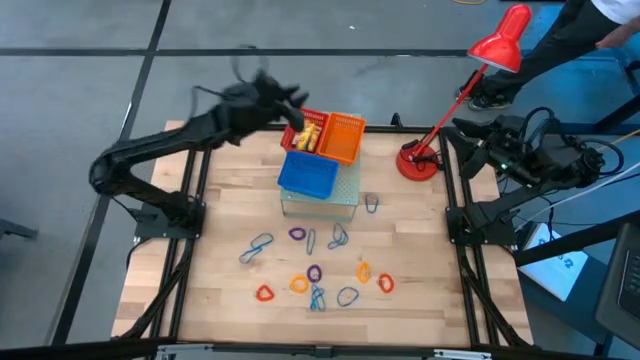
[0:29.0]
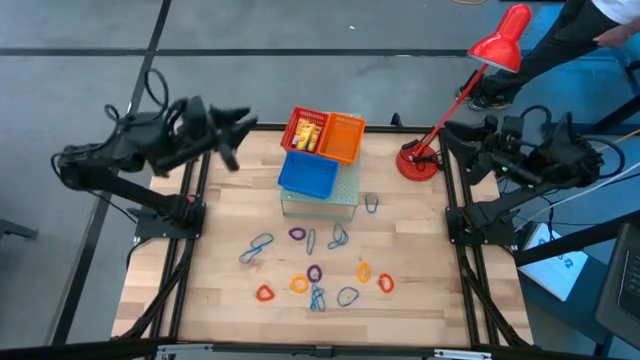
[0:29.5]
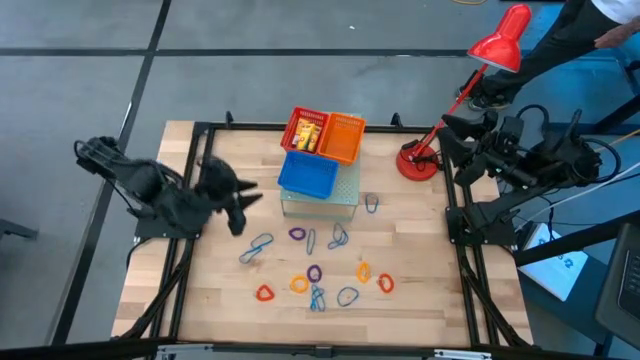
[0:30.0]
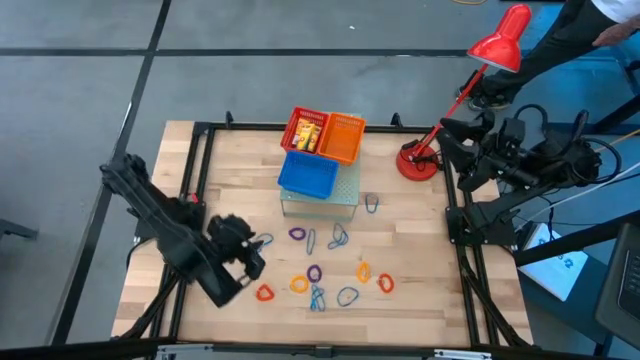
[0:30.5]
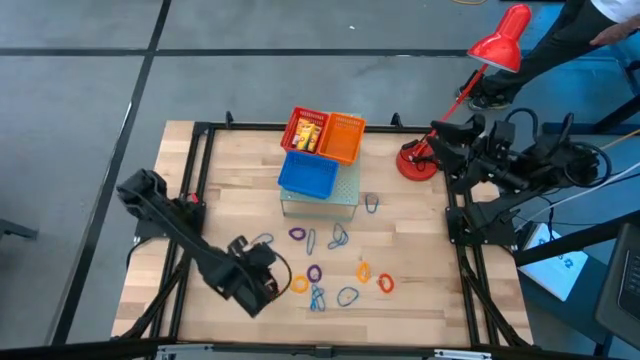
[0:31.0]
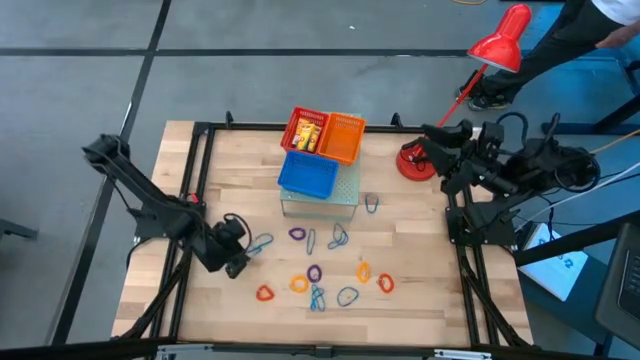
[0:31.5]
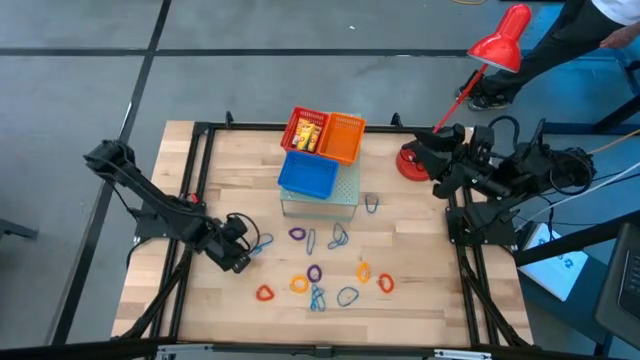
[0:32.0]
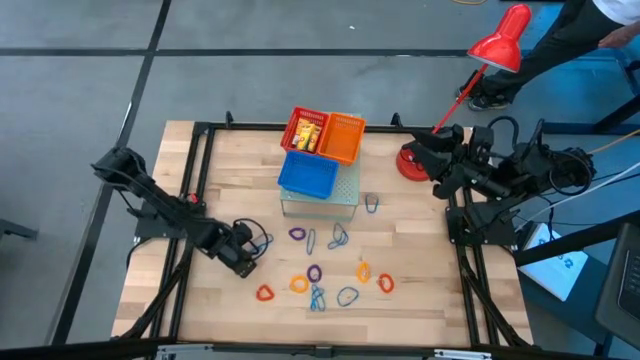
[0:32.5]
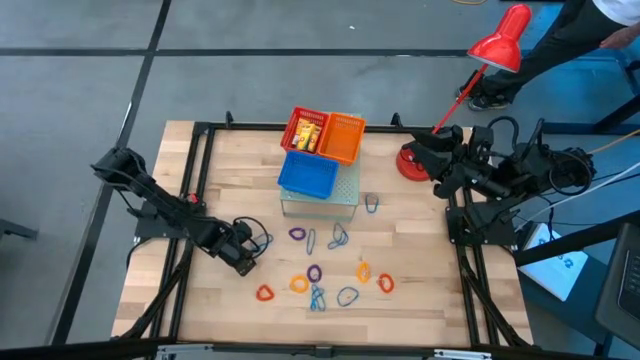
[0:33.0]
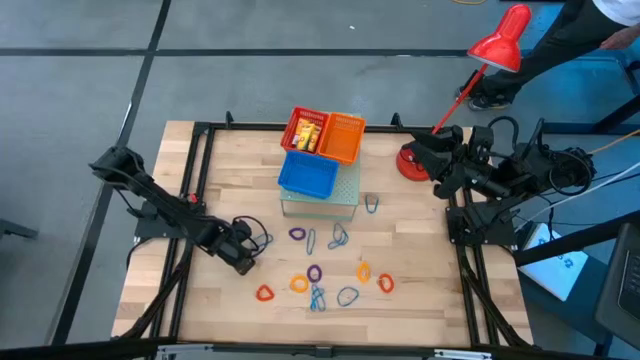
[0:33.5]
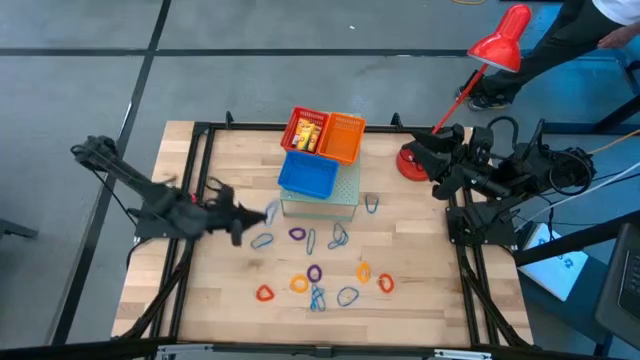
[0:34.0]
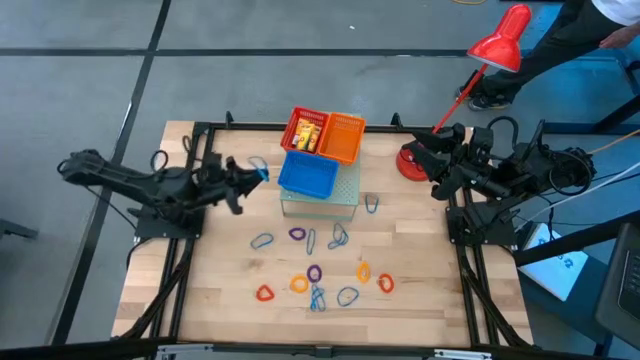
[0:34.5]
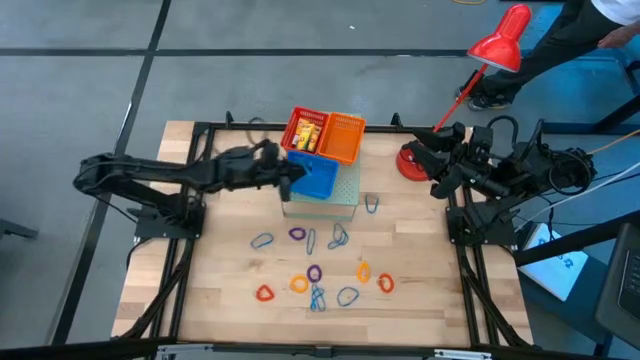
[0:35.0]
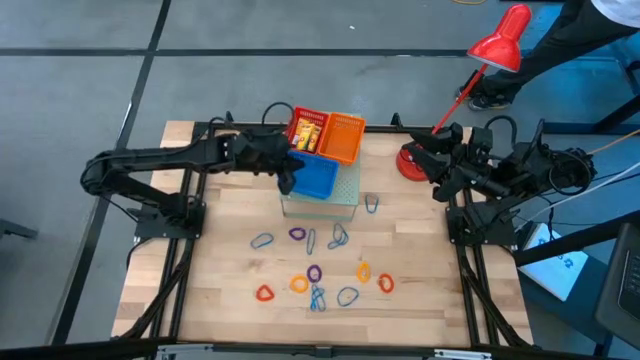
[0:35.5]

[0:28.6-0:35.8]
Task: Pick & Place Office Desk Supplies
Put the blue rubber band into the blue basket on the shelf

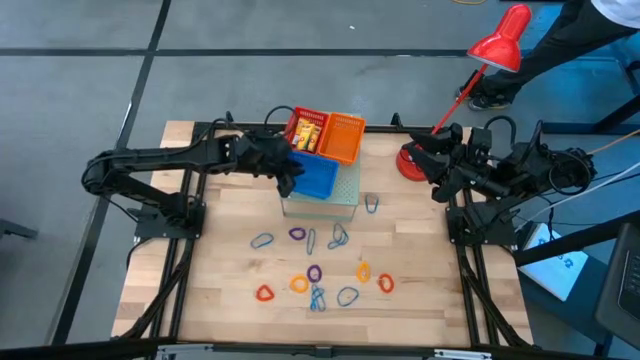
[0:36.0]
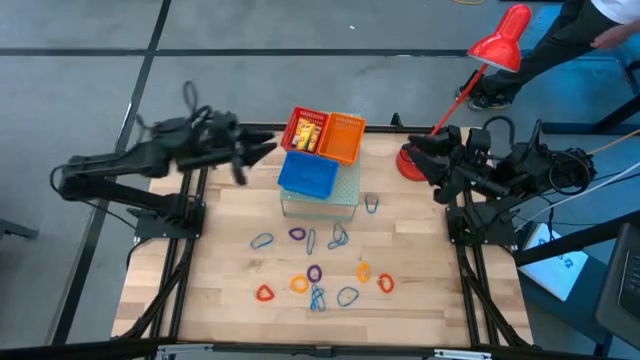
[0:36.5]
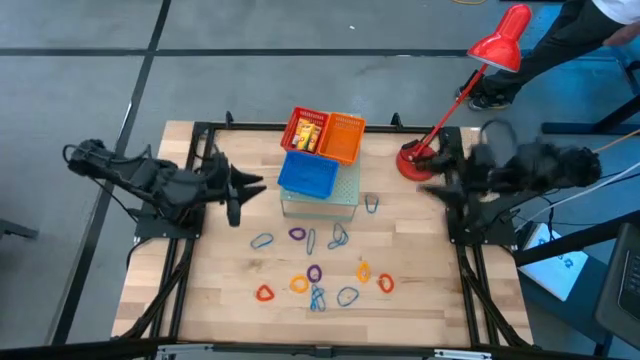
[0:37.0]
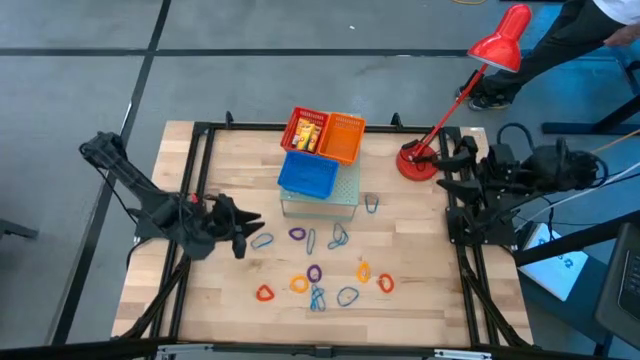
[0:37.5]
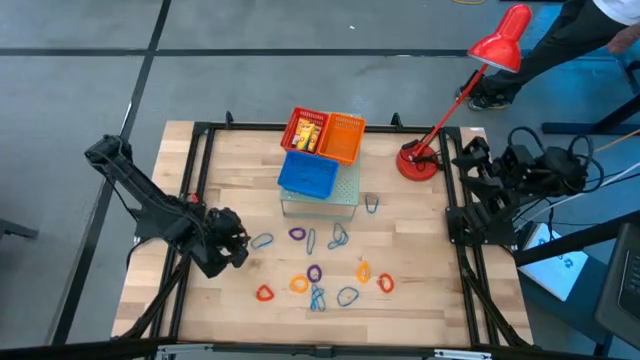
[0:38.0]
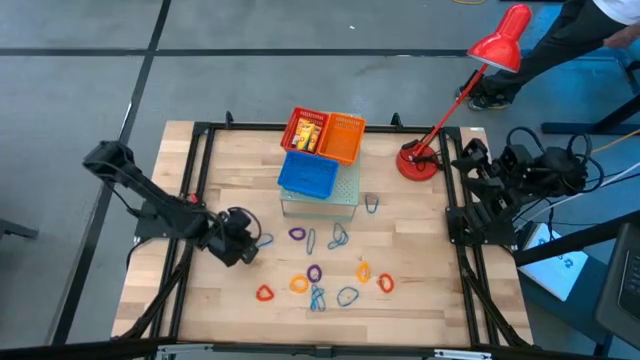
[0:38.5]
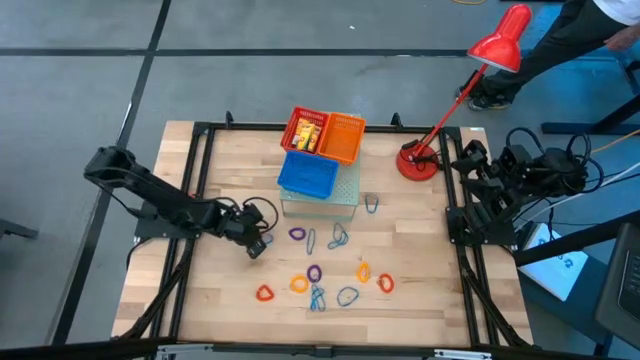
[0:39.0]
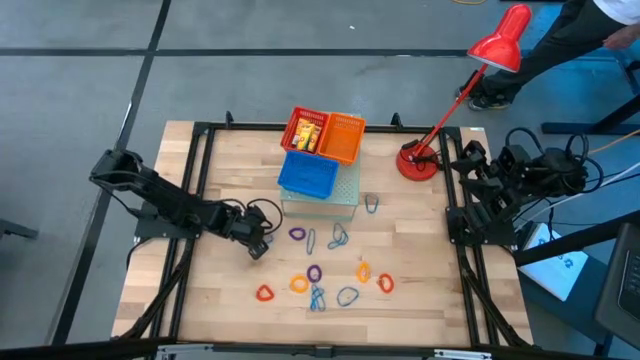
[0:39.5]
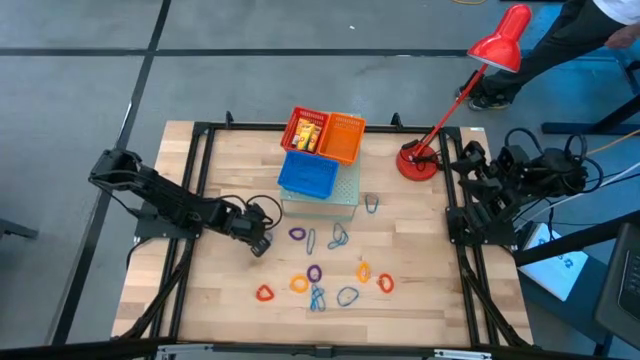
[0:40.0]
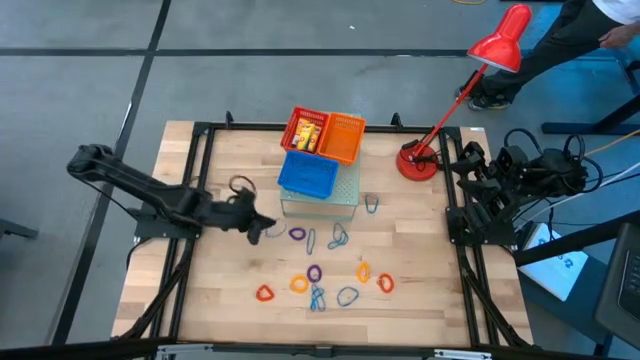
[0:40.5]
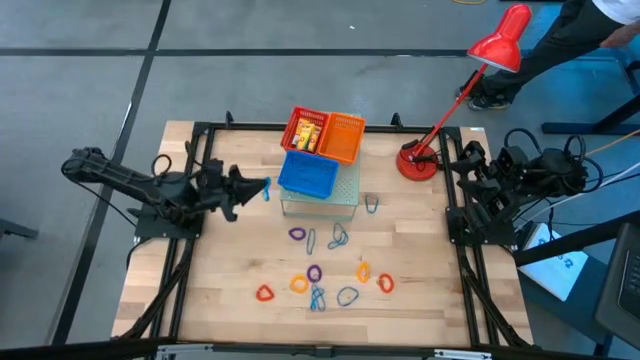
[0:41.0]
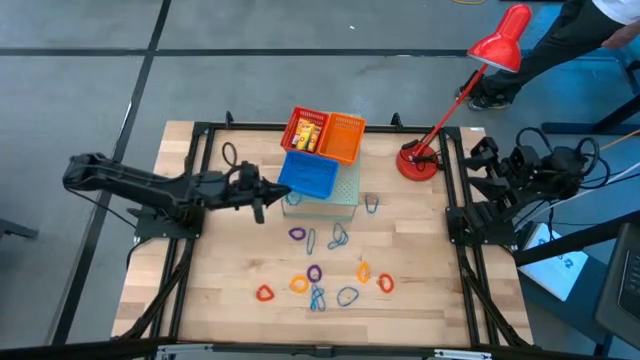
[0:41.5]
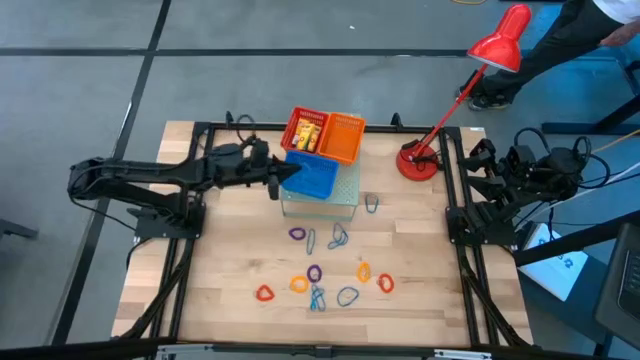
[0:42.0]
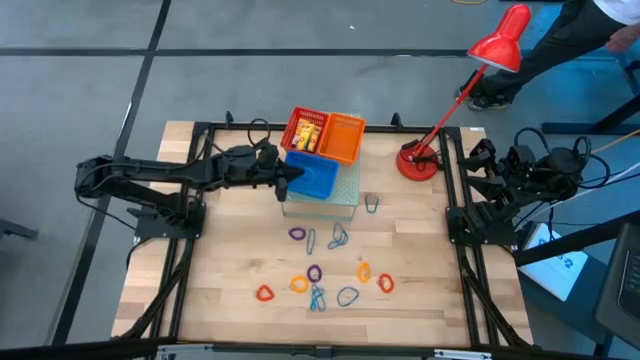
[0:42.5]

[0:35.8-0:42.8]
Put the blue rubber band into the blue basket on the shelf

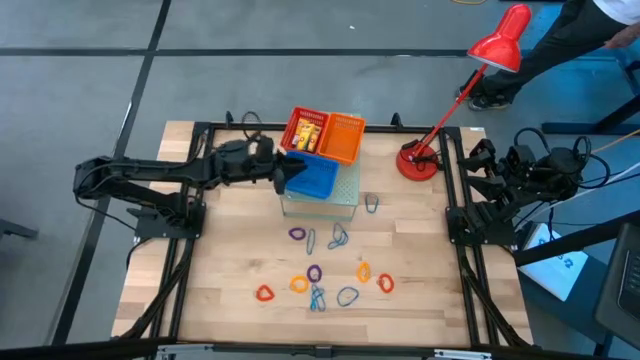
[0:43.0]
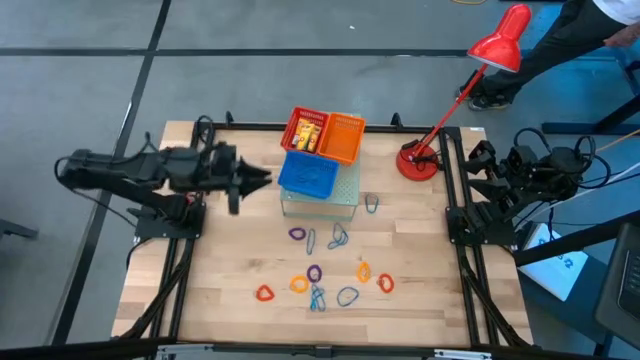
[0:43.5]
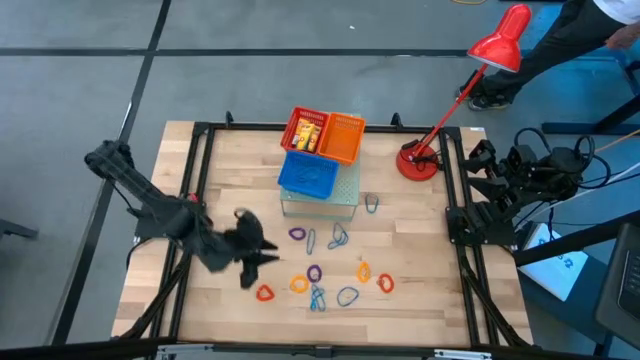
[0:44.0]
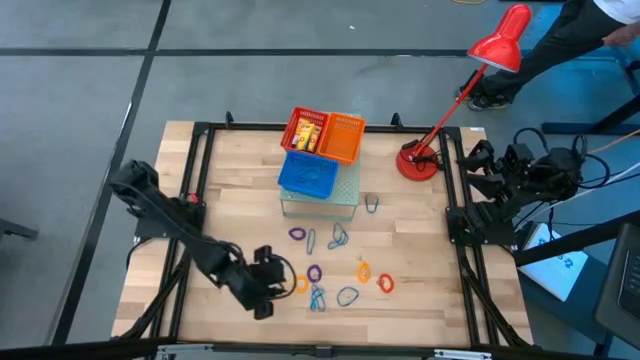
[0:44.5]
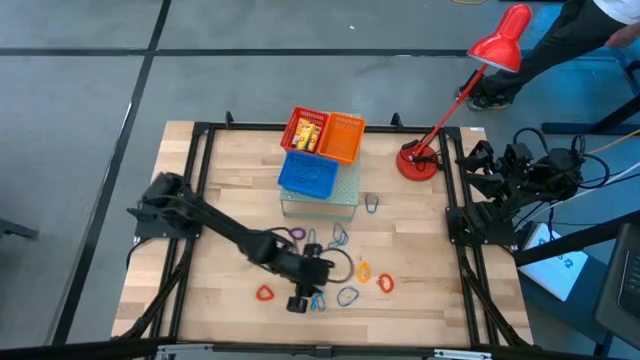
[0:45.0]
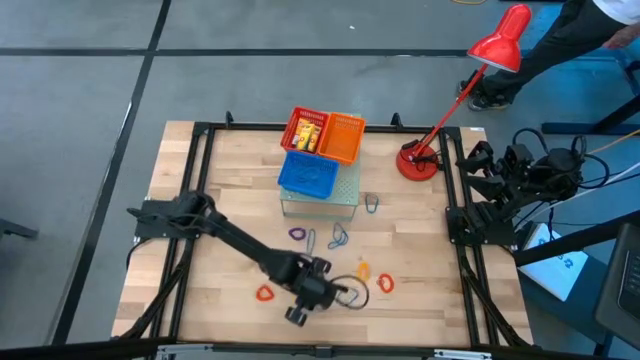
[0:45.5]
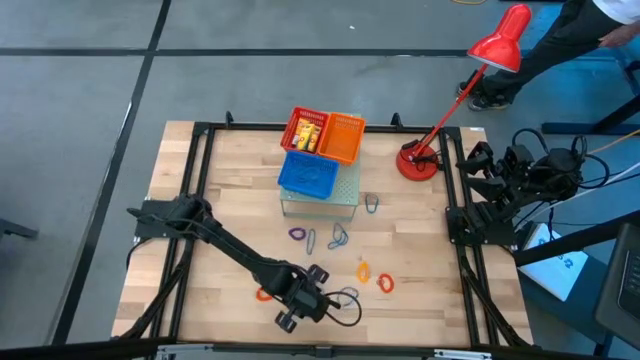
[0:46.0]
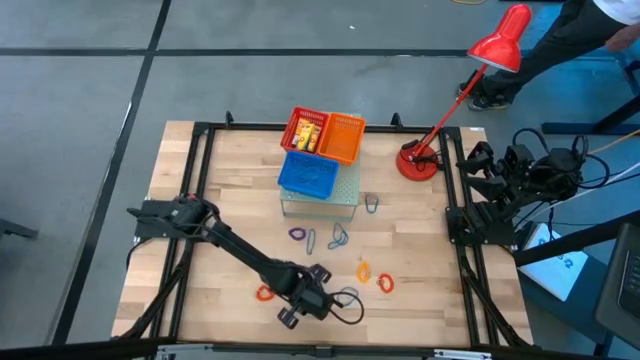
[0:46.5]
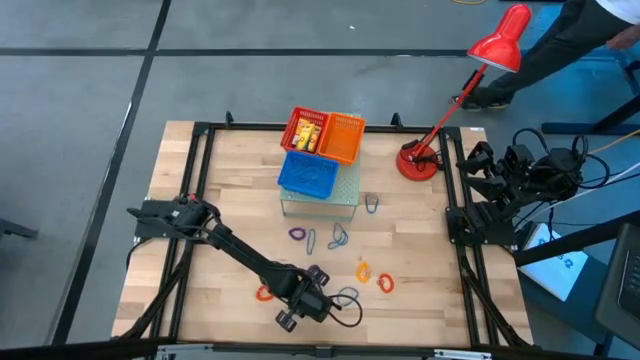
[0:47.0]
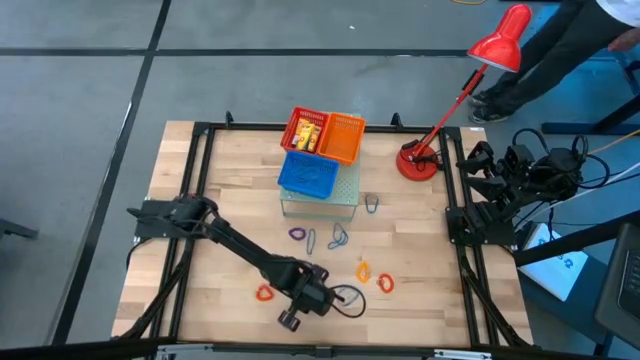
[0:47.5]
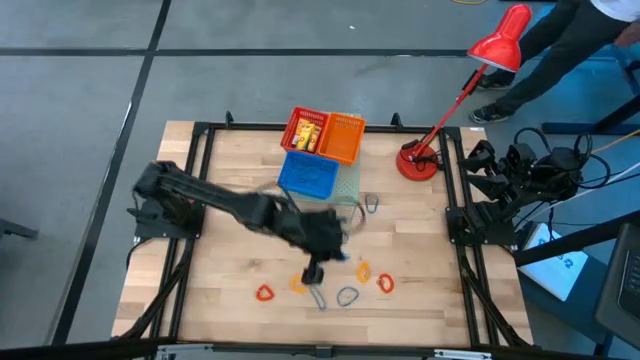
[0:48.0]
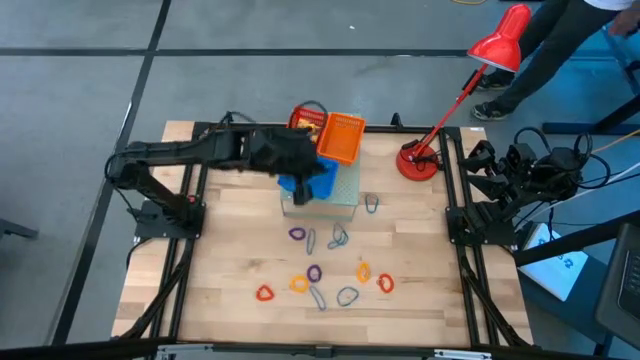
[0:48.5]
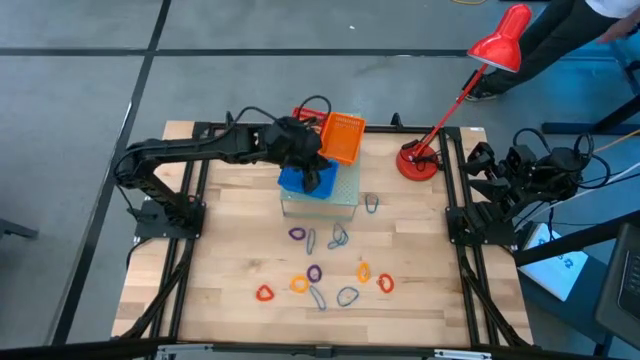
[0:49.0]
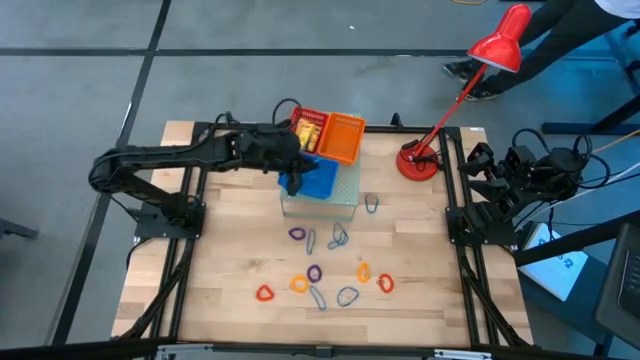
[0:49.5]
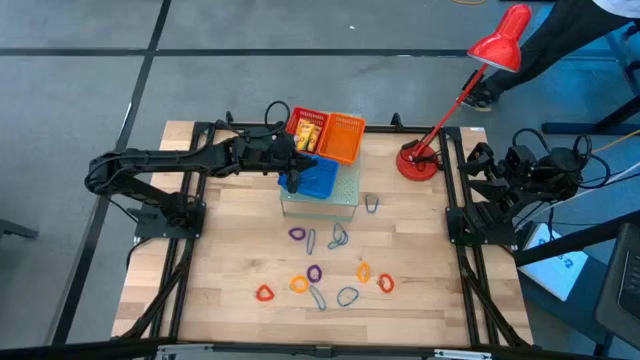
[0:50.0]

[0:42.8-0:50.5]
Put the blue rubber band into the blue basket on the shelf
